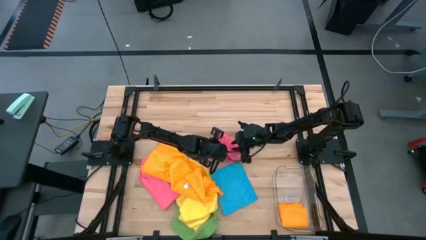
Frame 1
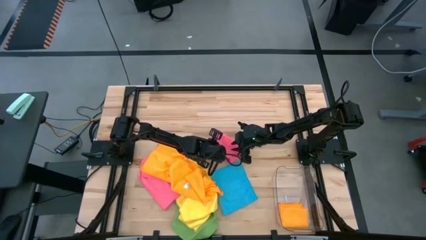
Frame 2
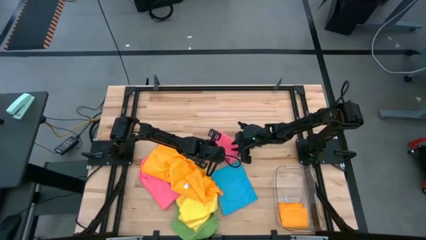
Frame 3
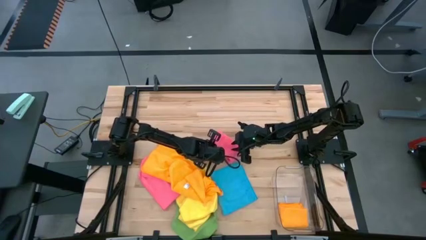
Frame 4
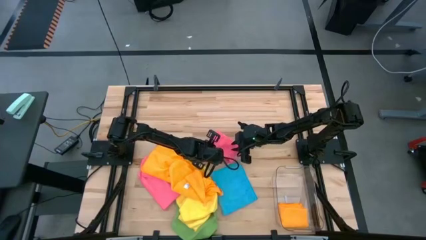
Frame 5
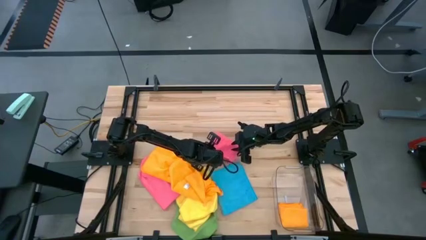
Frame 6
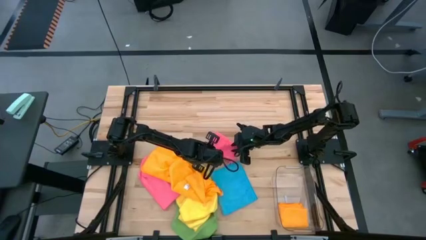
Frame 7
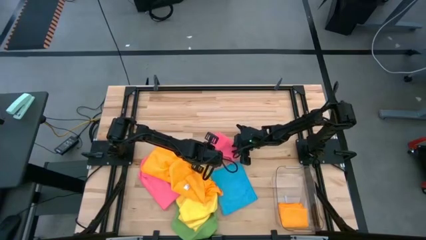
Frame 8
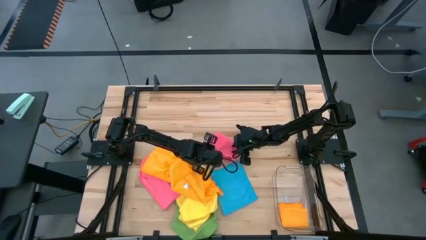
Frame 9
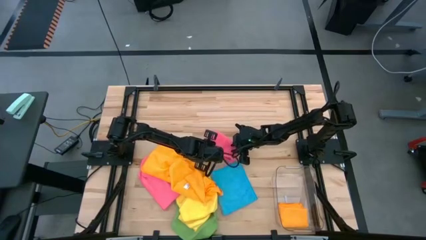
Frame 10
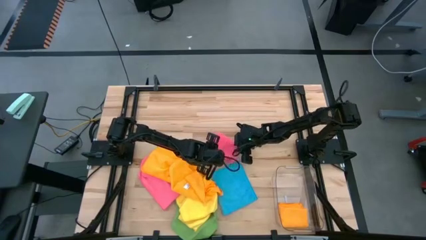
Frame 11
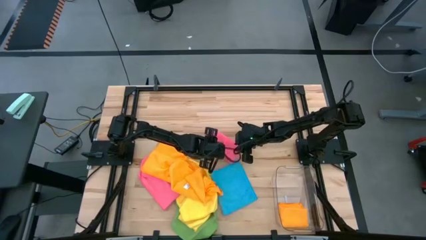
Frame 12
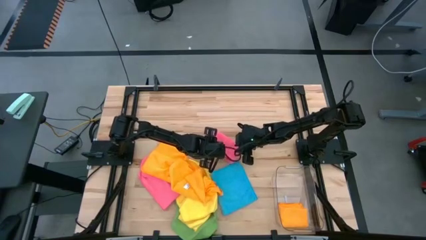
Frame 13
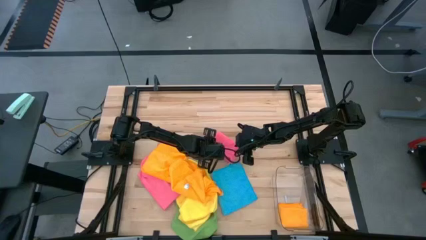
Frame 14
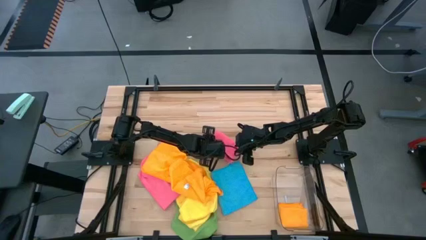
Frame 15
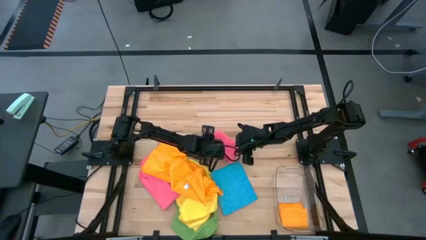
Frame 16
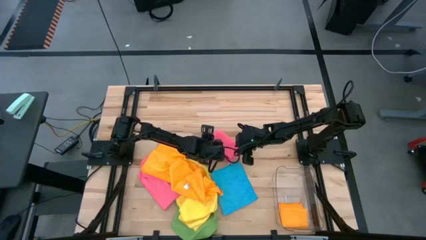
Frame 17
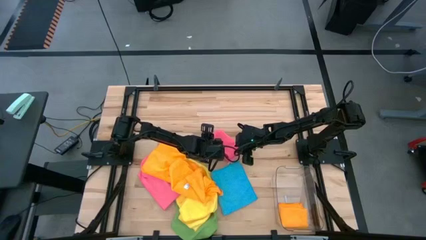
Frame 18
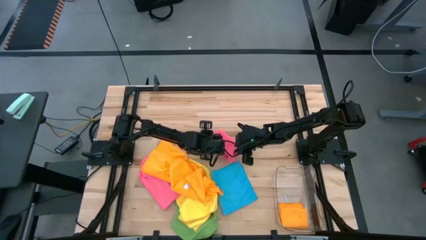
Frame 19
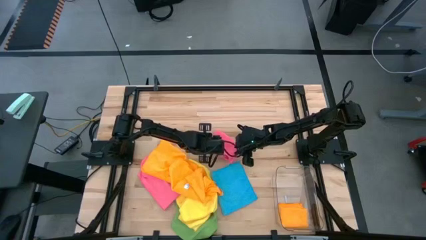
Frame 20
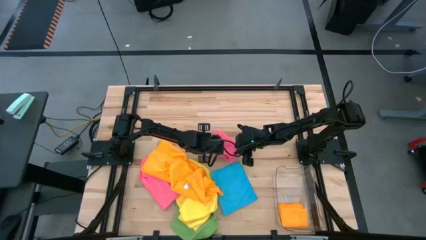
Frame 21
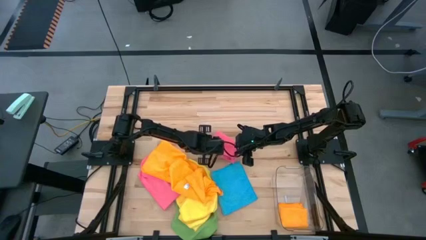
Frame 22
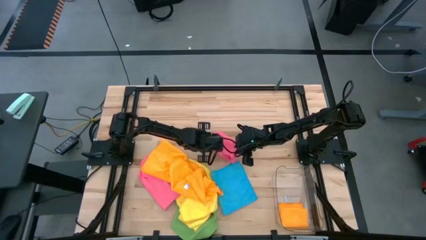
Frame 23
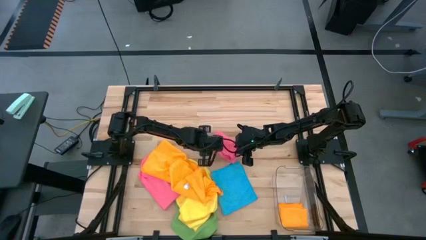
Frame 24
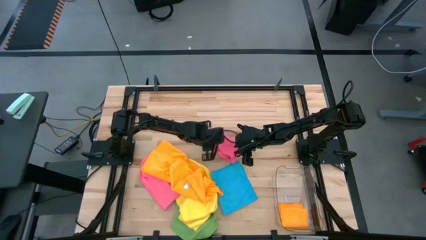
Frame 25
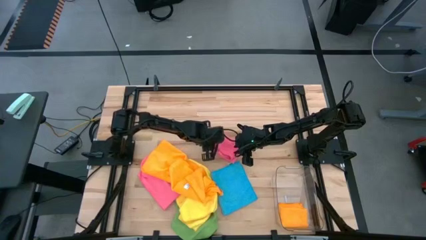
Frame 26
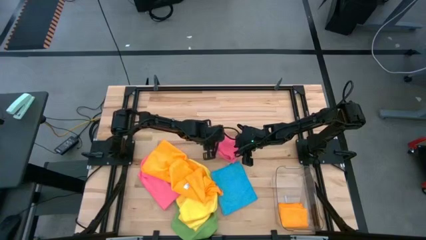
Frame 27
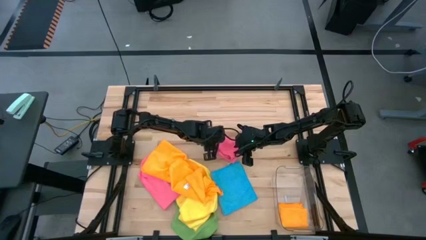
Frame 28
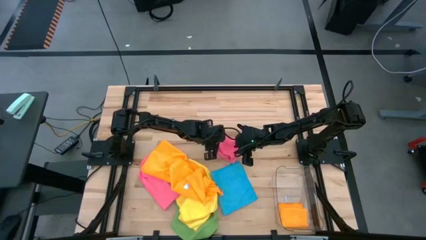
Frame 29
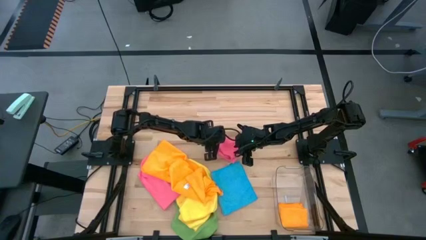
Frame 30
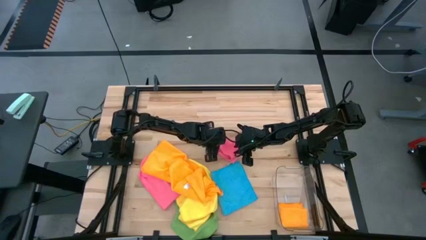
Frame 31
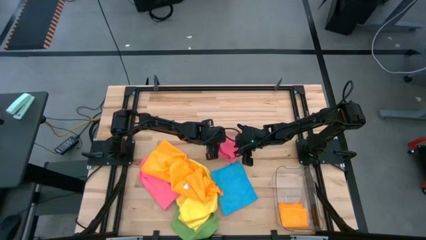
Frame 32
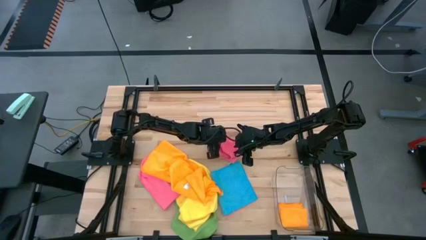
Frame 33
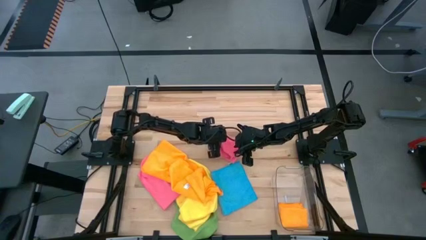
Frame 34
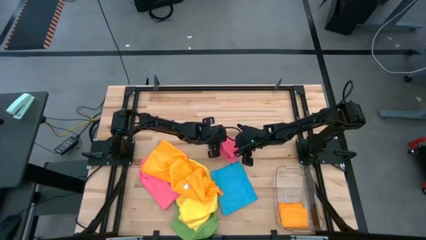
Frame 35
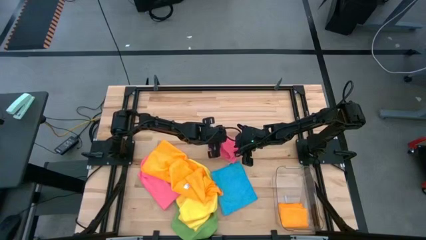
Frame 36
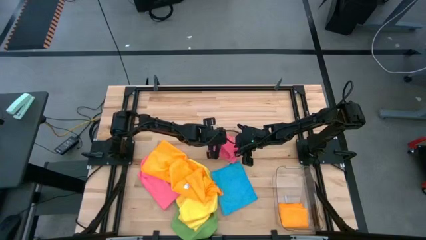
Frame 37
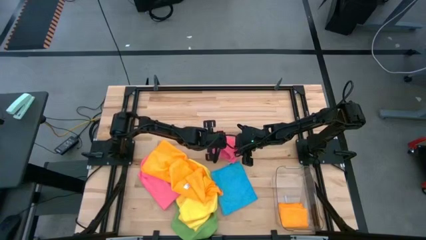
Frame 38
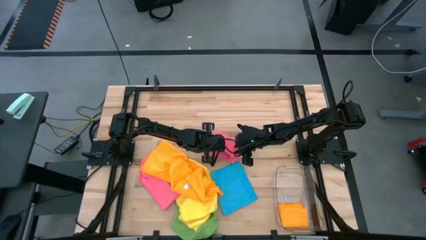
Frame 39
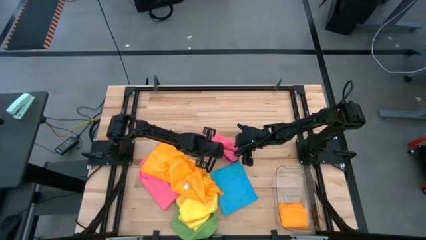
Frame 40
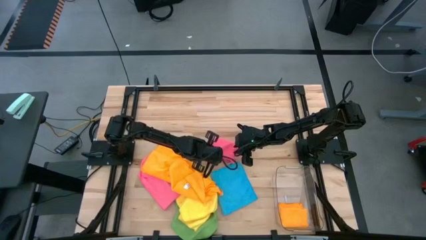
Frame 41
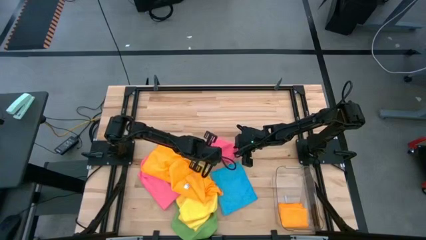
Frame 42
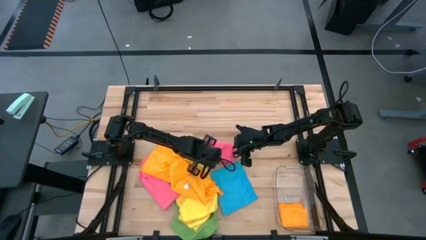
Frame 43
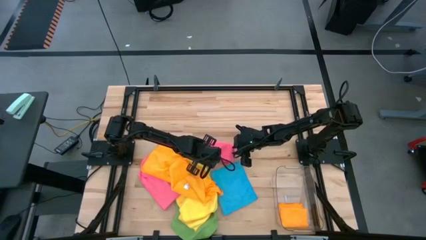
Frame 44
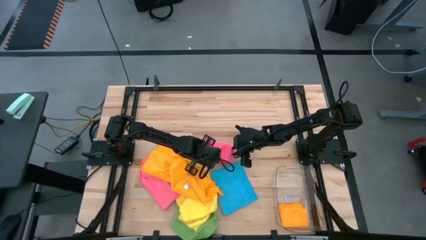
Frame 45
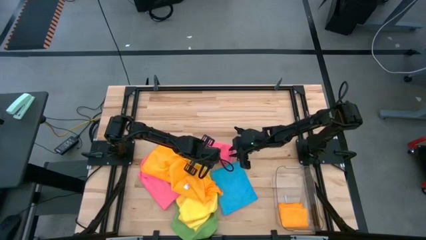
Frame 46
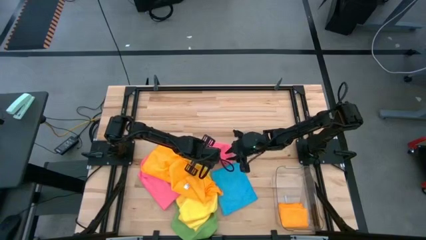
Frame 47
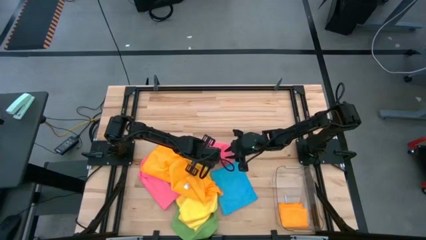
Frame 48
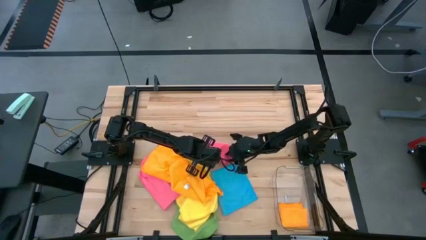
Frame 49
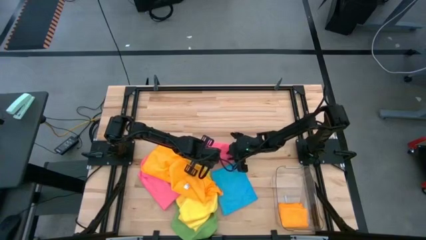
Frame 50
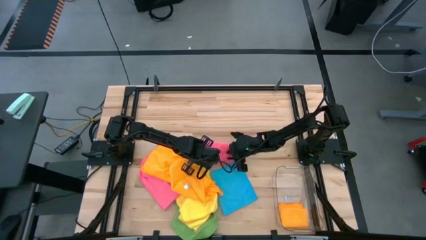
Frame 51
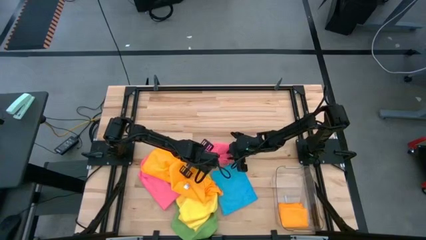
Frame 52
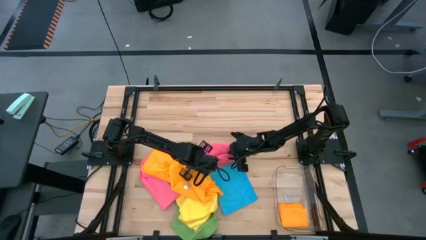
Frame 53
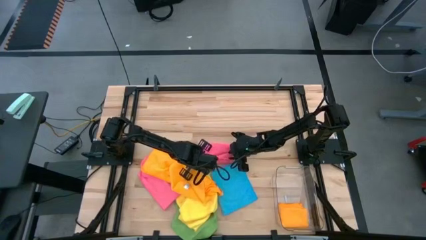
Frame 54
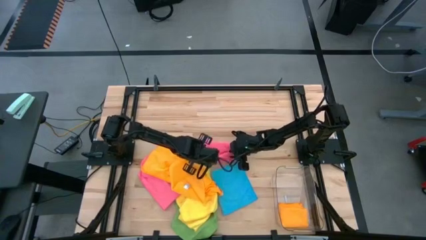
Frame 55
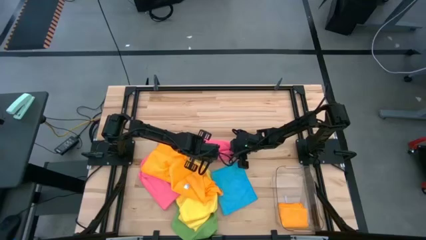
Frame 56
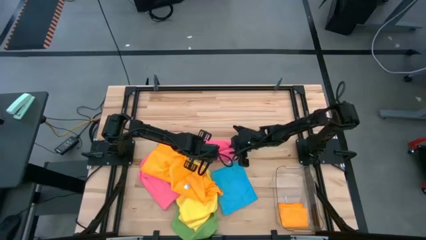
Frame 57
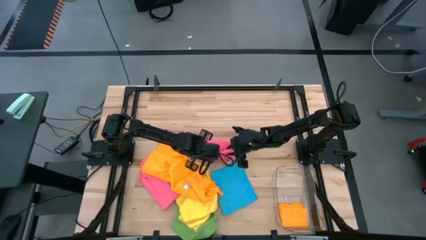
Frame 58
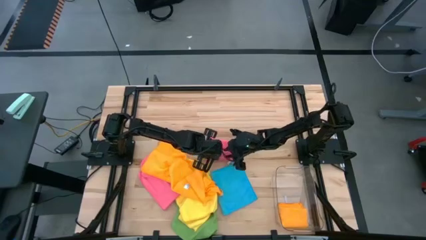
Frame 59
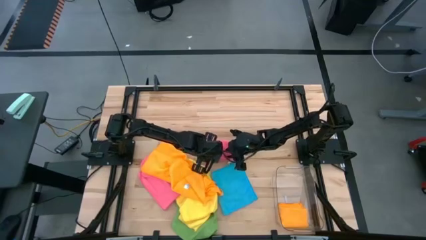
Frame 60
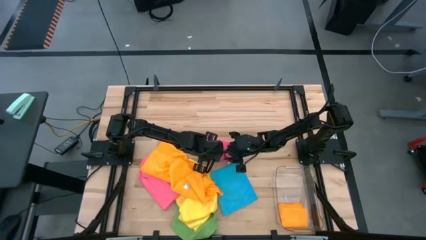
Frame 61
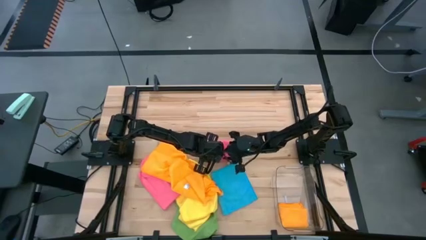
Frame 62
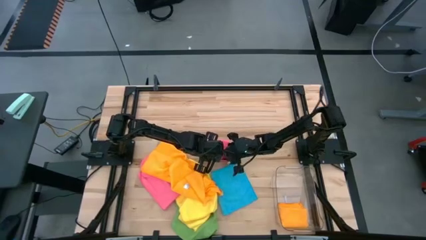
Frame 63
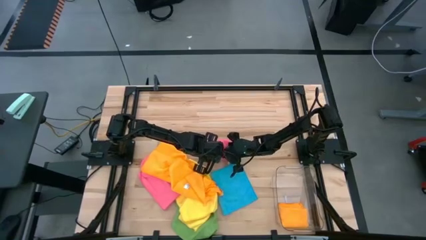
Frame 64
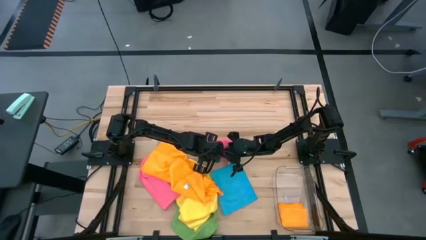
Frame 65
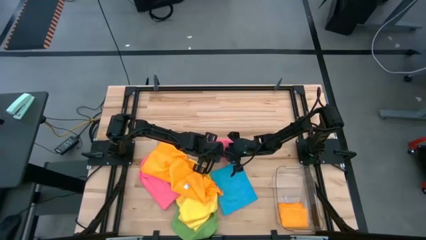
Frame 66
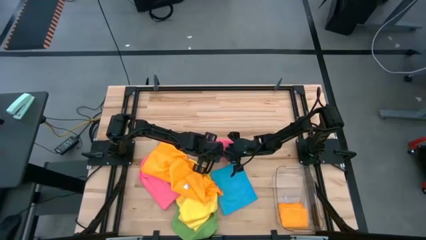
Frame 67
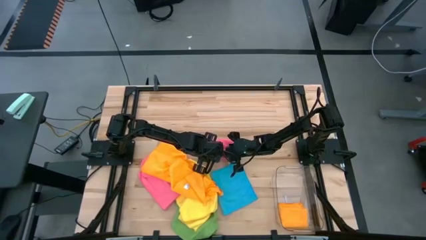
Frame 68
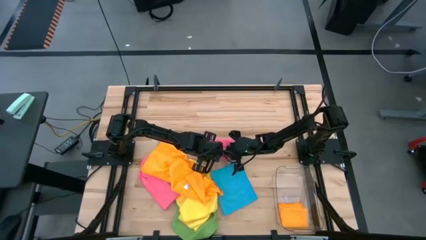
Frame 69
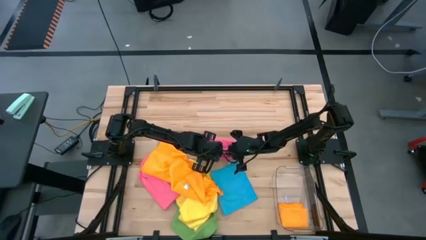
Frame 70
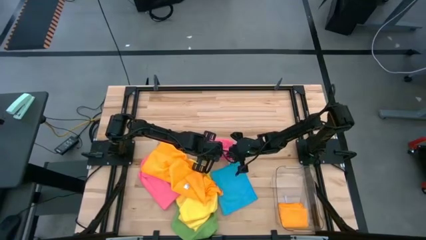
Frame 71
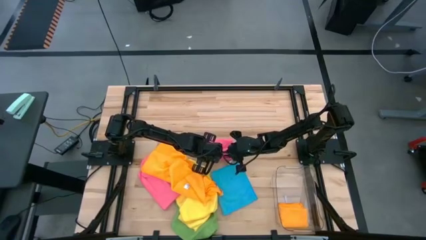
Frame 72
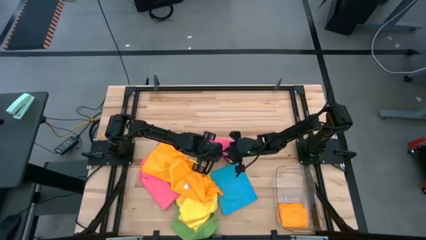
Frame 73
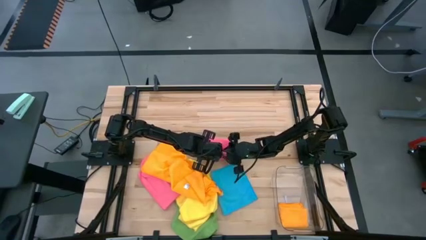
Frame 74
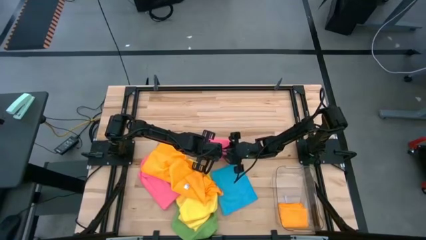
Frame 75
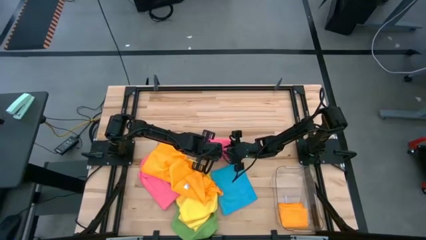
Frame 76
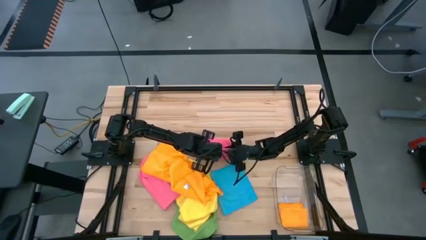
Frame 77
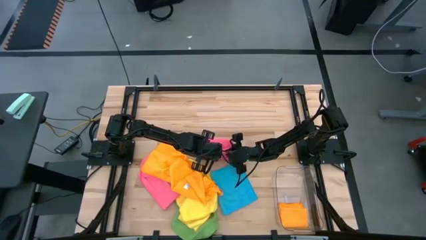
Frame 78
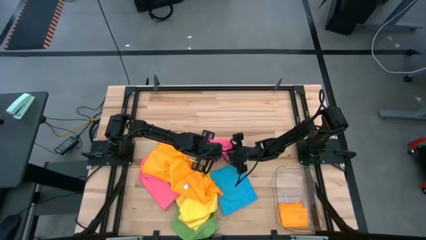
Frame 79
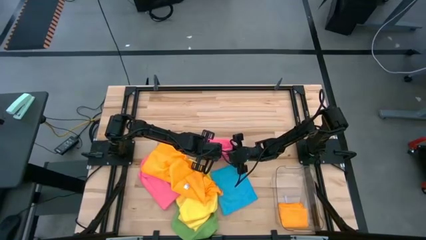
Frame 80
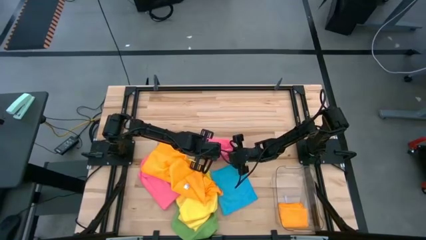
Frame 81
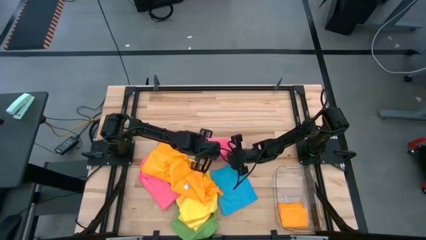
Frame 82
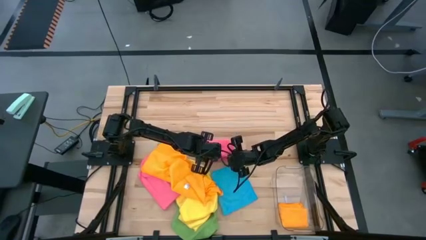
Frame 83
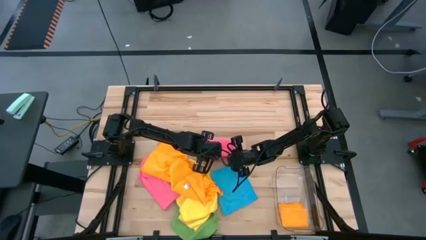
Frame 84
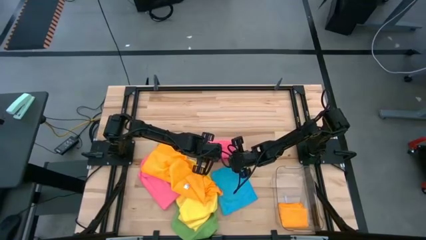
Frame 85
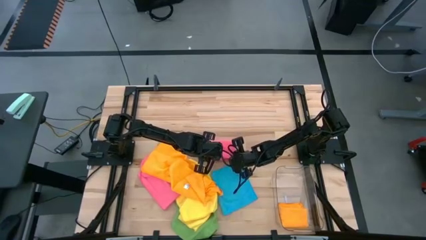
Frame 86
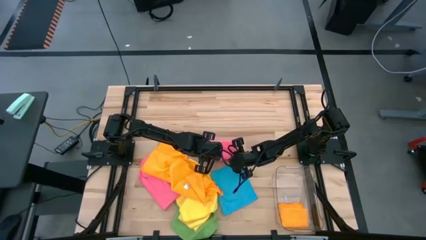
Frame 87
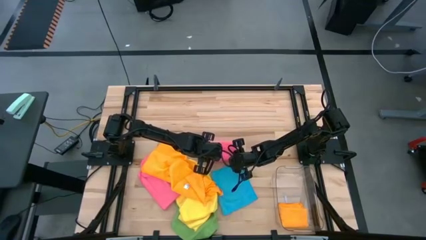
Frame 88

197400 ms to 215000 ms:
Task: Fold microfiber towels
Fold the pink towel
